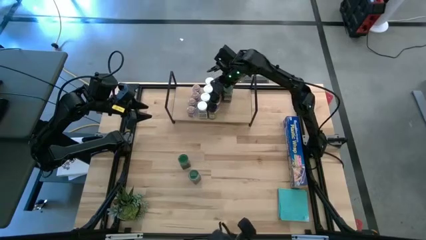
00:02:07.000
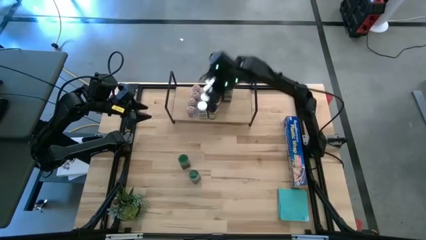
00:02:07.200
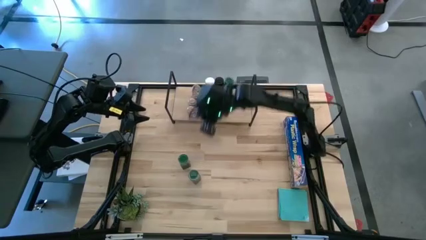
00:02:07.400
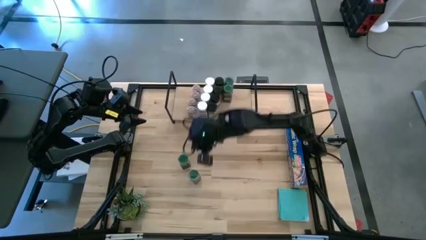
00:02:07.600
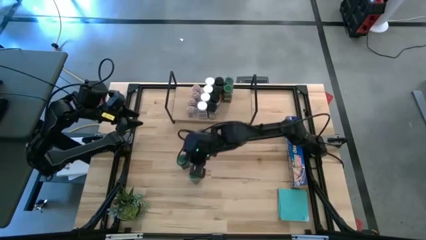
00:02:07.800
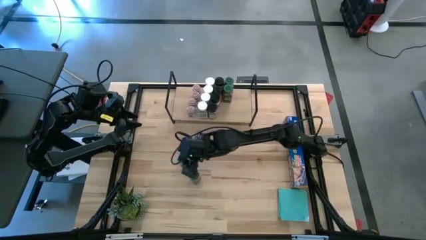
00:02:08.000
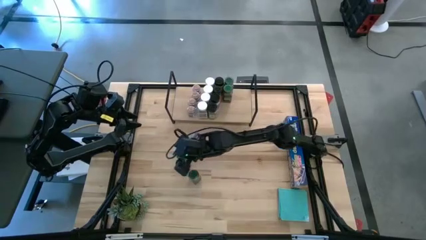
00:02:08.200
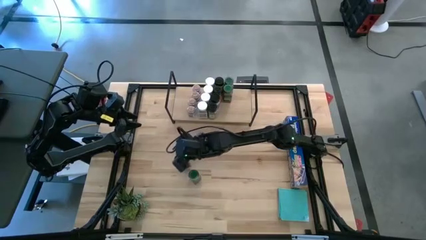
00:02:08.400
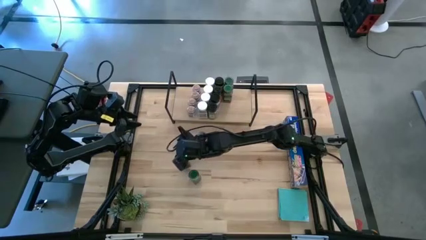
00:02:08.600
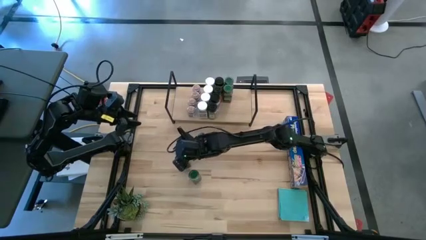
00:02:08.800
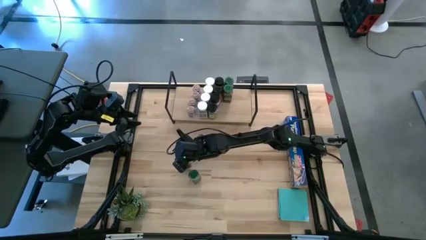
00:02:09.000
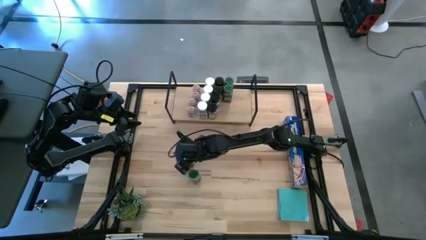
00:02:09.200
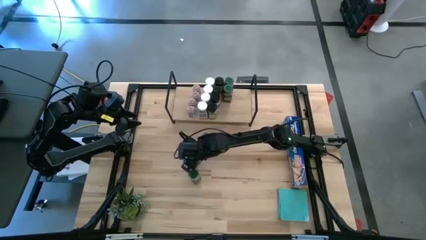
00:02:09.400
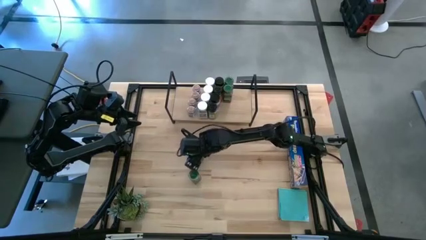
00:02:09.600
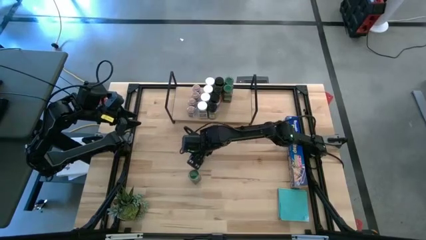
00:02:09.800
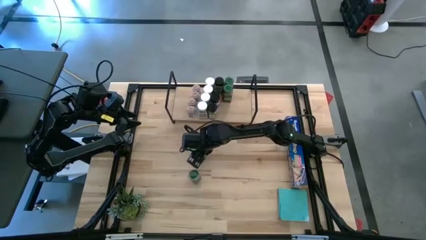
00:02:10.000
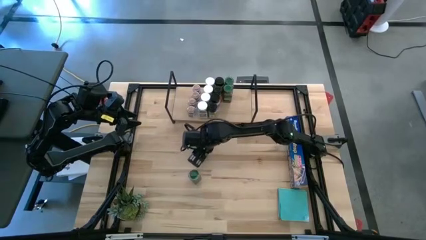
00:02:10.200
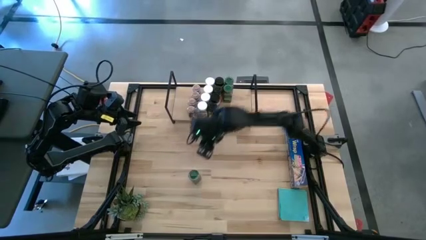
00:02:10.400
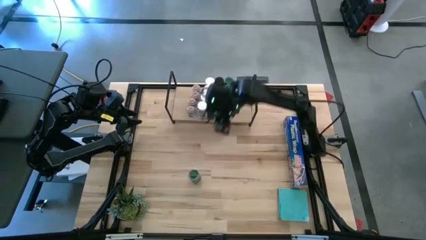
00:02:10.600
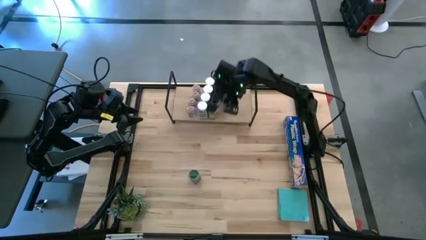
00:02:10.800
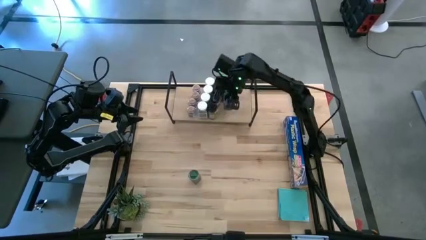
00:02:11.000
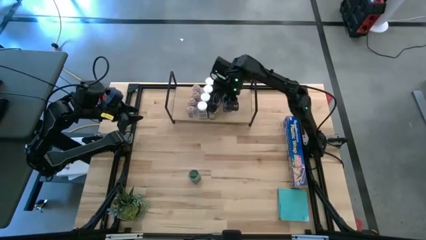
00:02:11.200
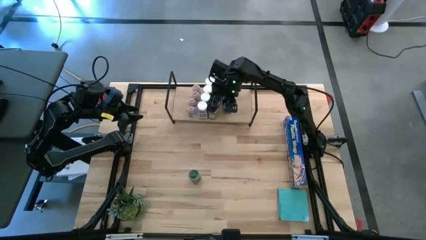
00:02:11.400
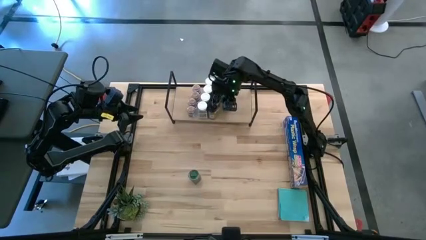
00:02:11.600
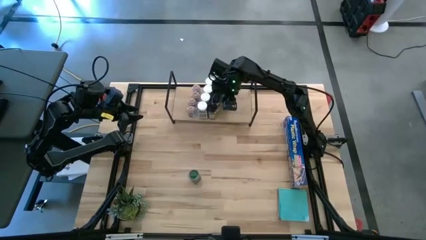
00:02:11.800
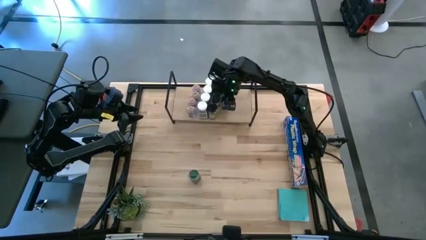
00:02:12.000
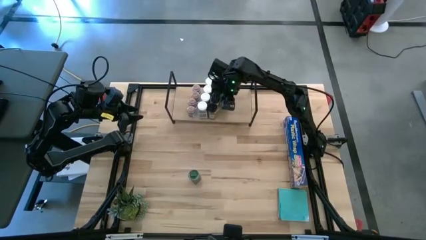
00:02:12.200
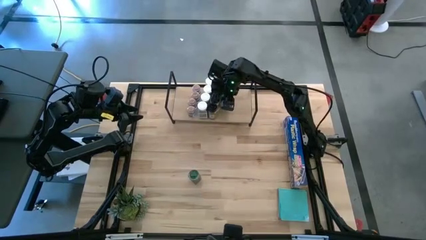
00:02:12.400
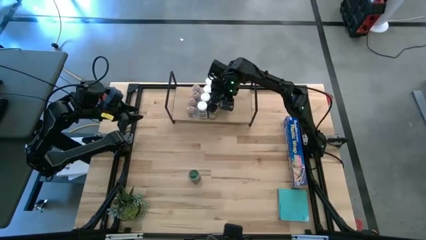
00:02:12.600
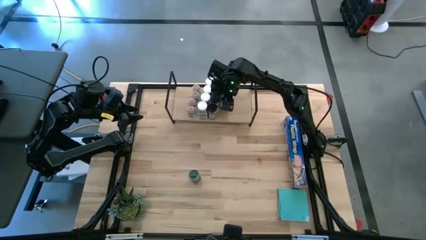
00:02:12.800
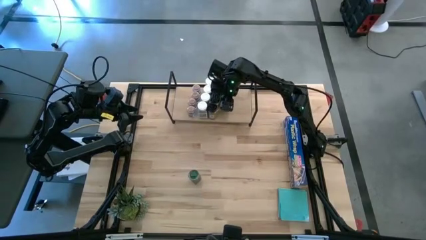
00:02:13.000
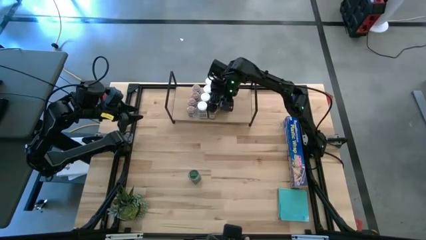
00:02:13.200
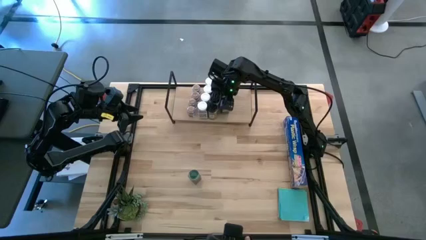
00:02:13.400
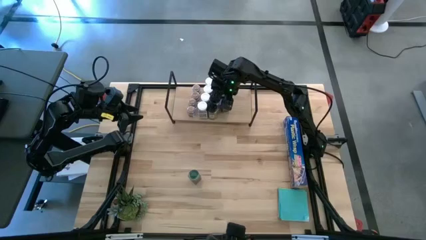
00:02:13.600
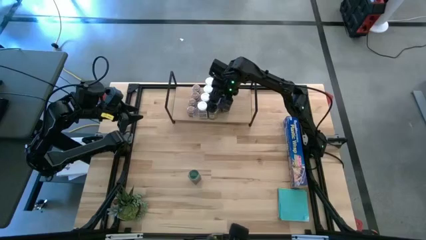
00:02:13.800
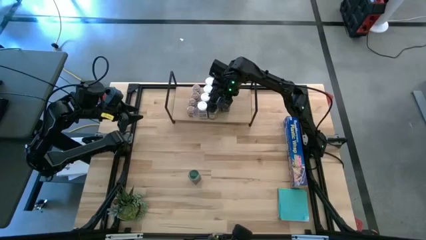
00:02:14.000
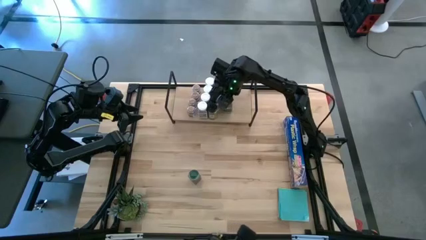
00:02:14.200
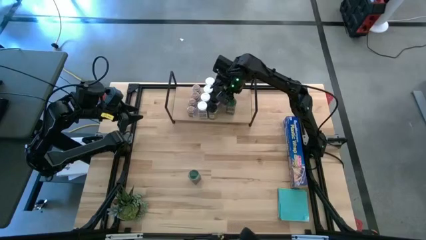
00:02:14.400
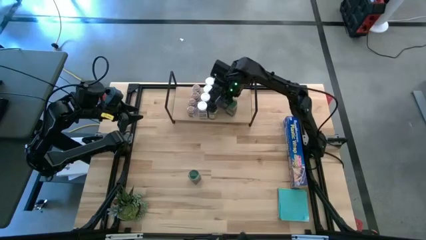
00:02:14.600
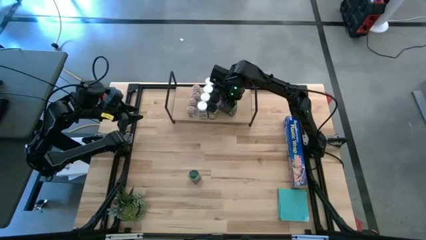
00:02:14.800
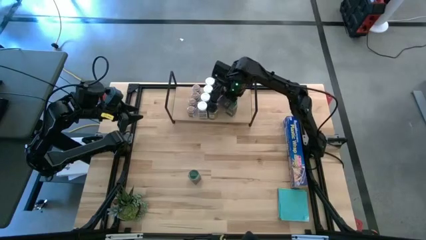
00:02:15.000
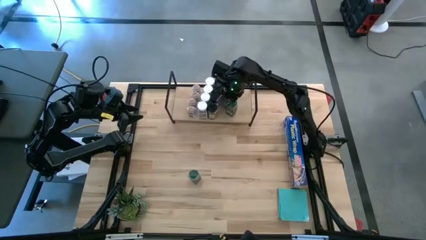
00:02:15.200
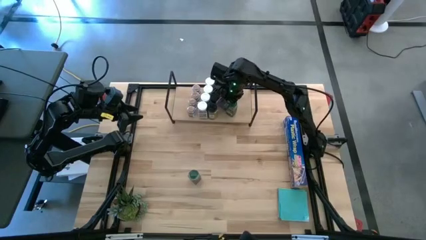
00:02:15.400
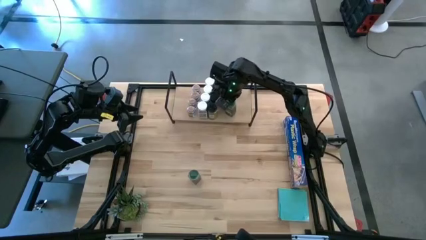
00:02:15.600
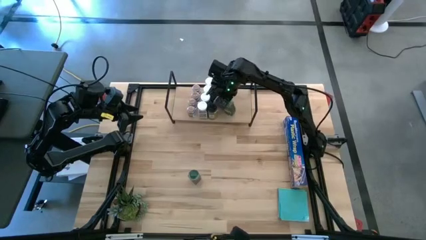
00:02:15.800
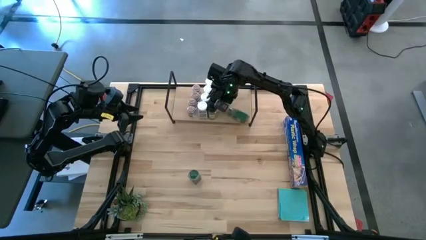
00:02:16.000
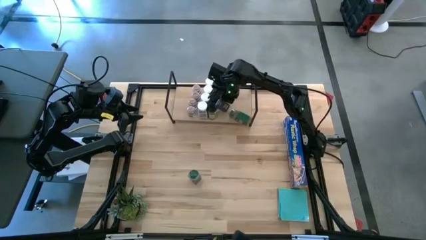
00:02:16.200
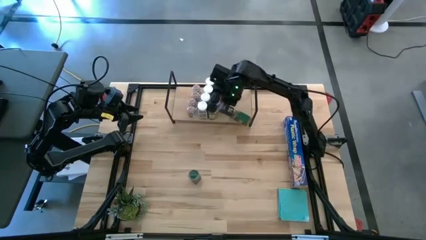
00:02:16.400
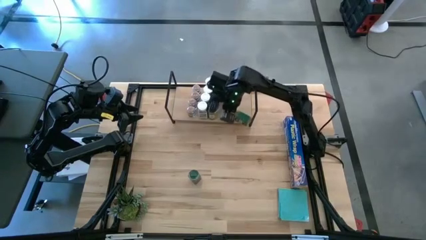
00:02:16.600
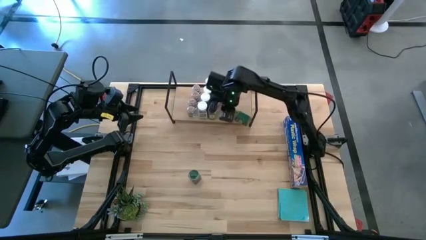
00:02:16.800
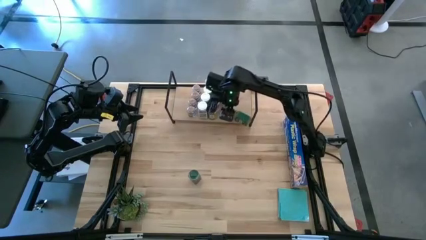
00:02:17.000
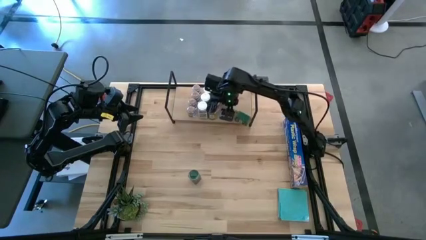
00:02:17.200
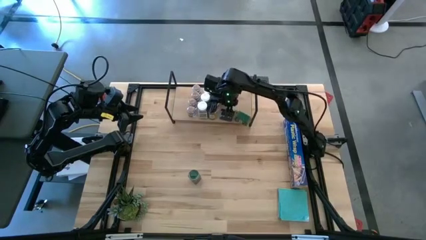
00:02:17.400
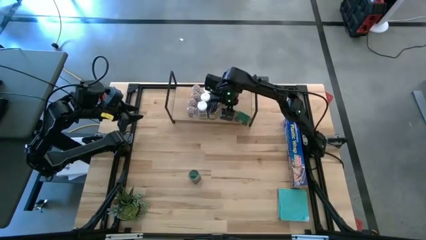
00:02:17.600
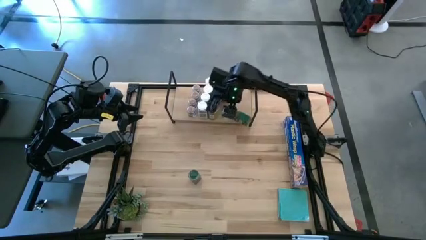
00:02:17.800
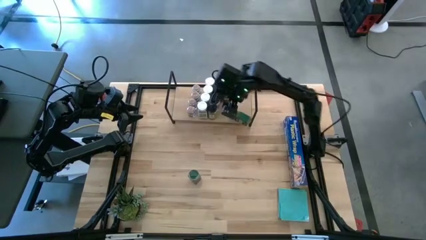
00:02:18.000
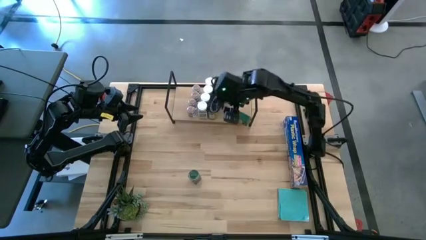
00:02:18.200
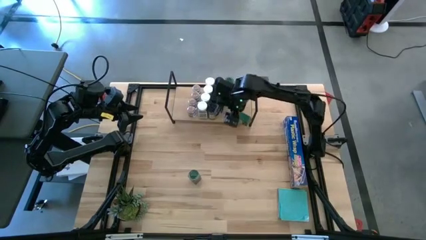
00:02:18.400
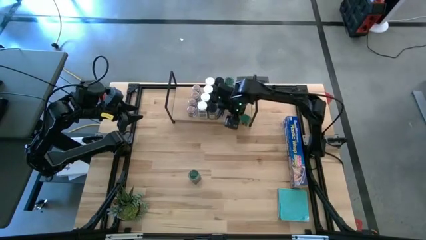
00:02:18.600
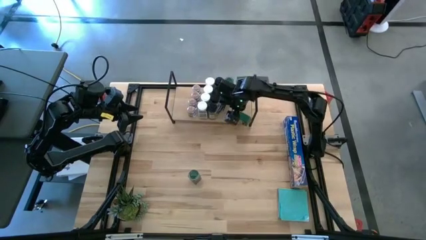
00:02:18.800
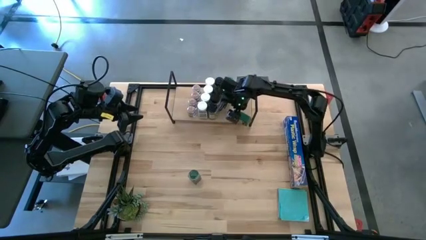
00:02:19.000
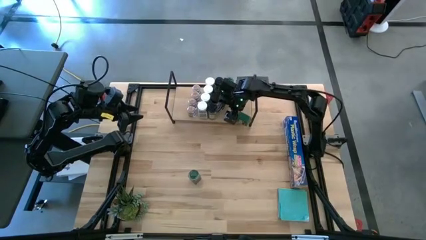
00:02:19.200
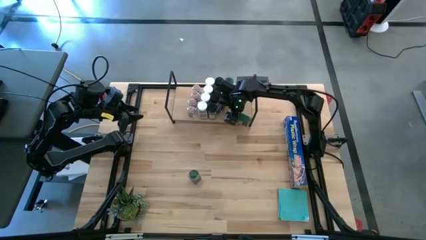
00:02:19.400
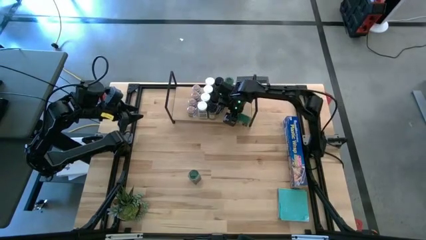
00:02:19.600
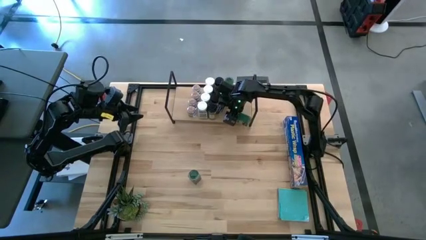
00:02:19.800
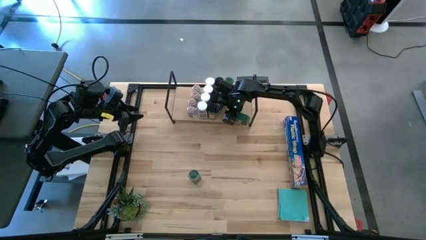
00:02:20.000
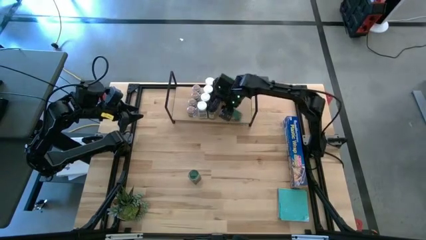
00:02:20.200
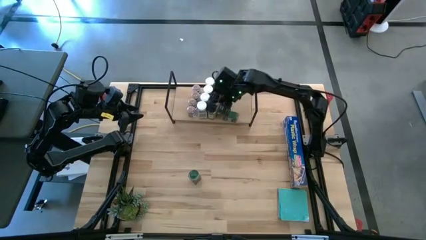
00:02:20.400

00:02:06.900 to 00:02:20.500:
Task: Shelf spices
Put the top green seasoning bottle on the shelf aligned with the other green seasoning bottle
